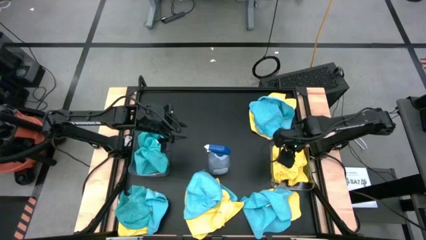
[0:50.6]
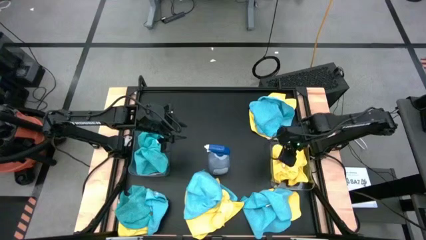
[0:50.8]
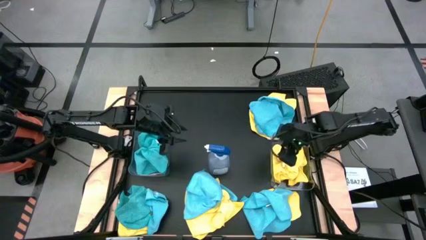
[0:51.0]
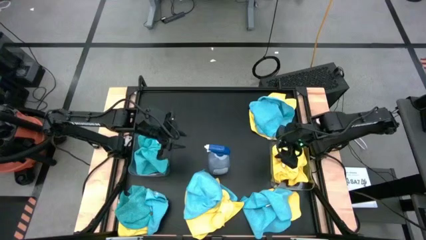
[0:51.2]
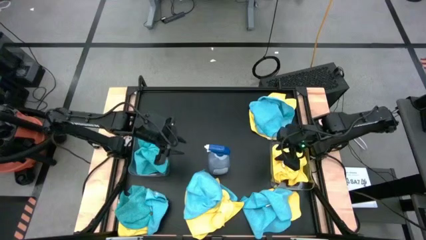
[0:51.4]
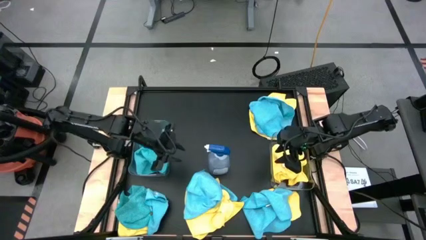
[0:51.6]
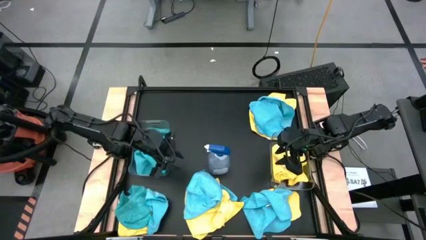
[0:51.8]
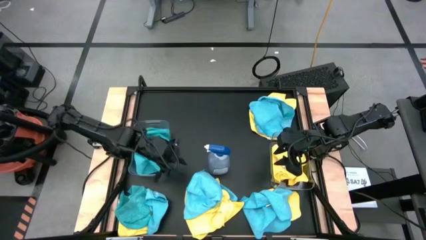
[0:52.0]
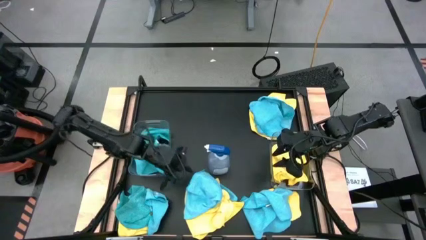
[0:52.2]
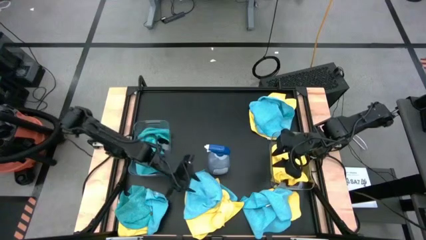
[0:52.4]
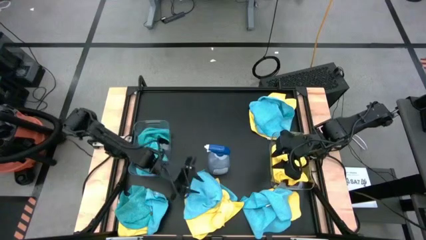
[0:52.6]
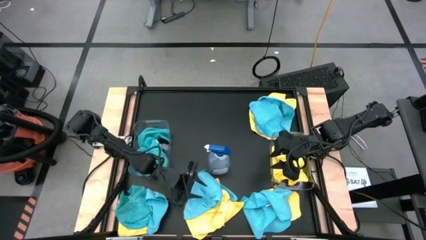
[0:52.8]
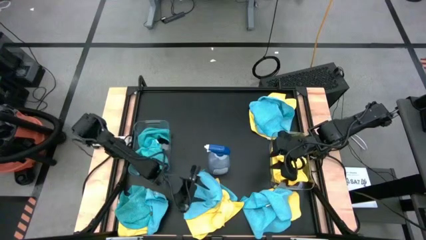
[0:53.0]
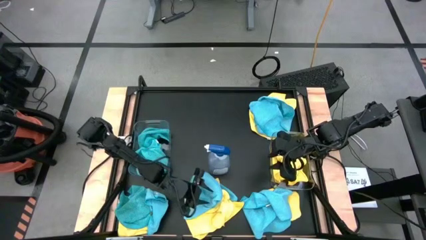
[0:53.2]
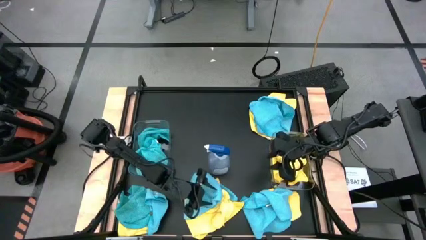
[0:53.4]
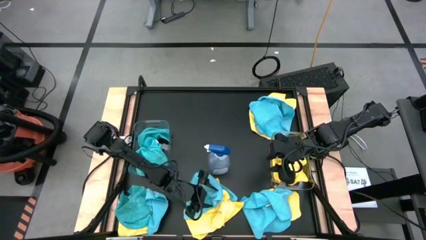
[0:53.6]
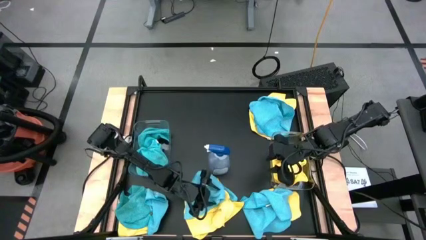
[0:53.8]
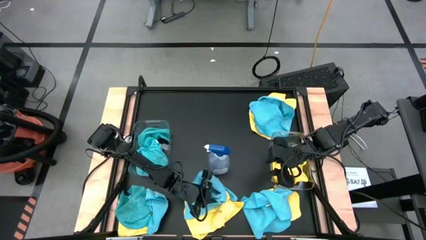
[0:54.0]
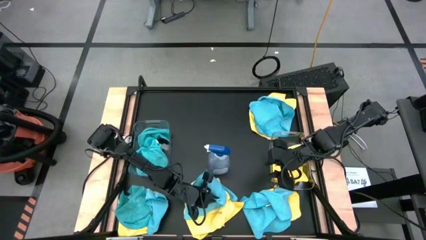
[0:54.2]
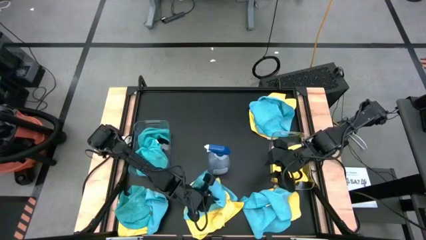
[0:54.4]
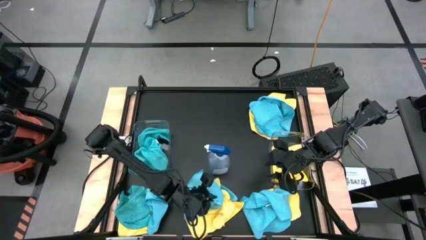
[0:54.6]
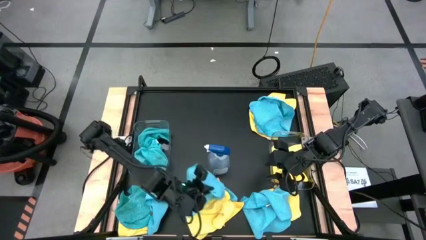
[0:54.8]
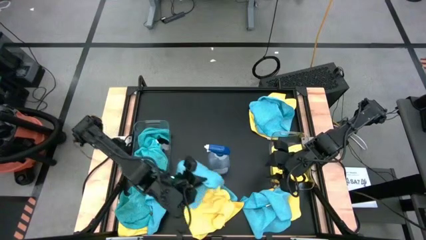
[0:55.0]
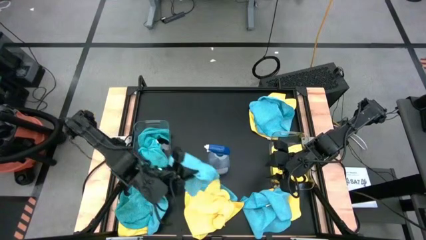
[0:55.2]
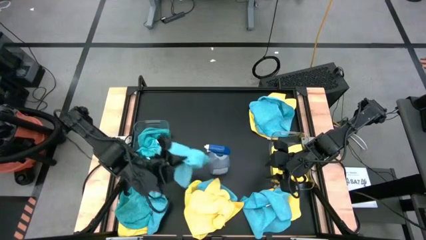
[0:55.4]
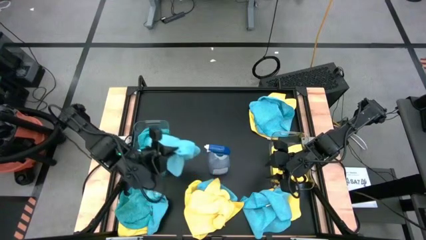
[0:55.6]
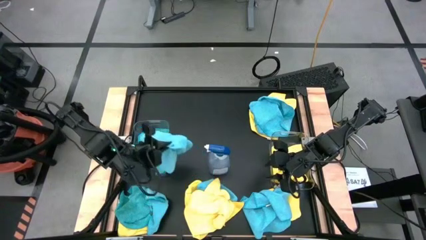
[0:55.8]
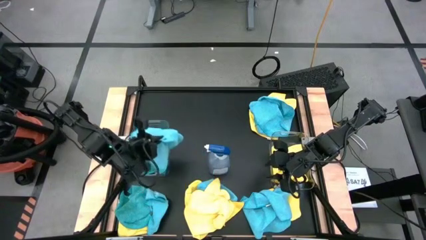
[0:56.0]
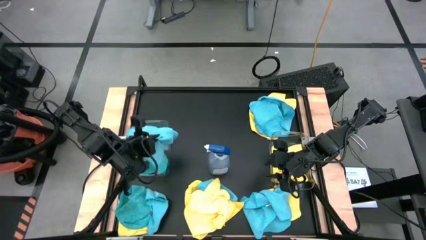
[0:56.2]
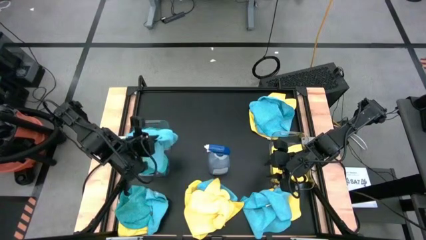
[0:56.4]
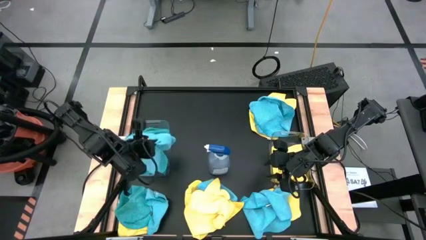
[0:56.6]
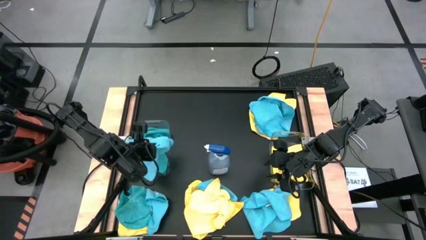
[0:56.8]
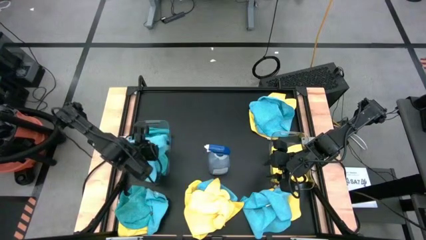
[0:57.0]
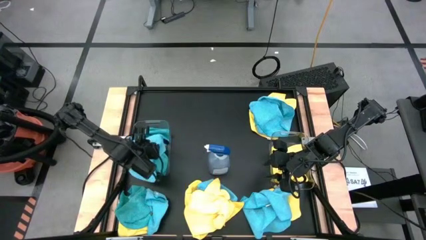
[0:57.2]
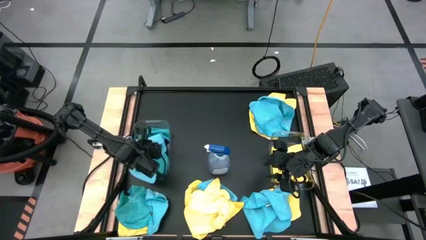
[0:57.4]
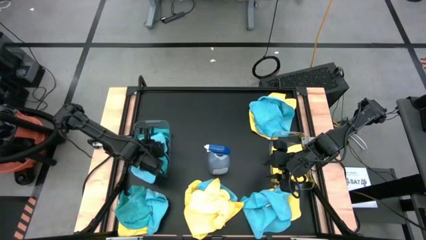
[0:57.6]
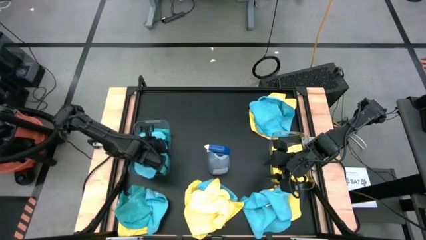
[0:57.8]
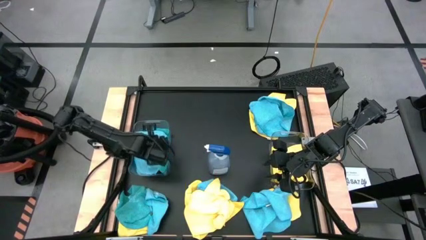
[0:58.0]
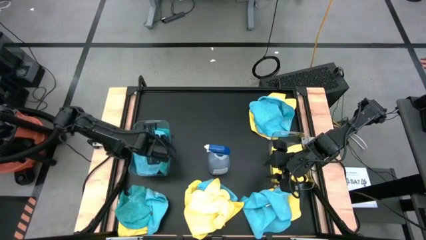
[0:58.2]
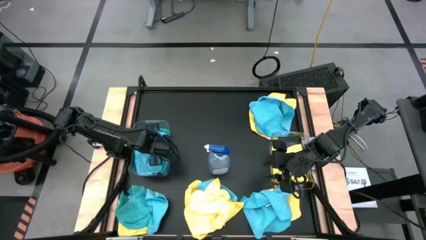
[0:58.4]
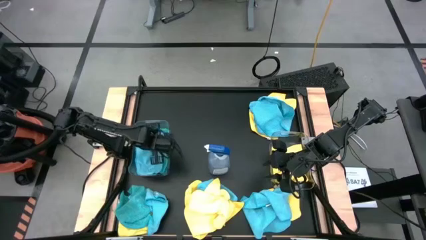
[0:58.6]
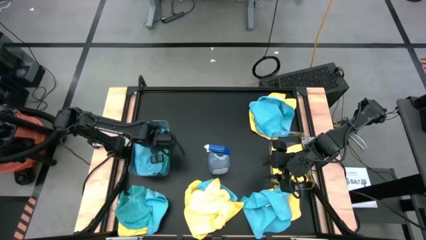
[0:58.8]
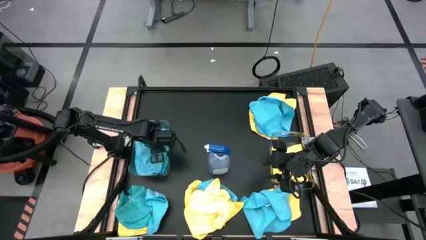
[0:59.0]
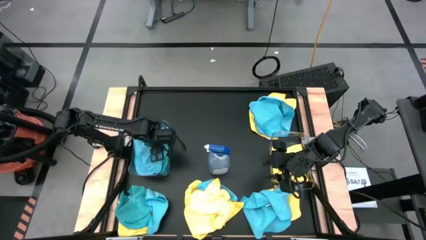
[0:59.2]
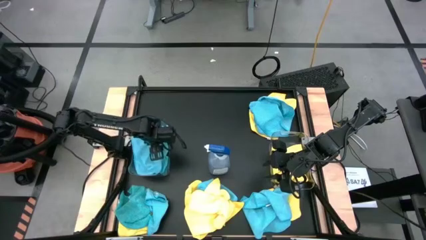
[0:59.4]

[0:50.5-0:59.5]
Task: Sort microfiber towel by color & place in baskets
Put the blue microfiber cloth into the left transparent bin

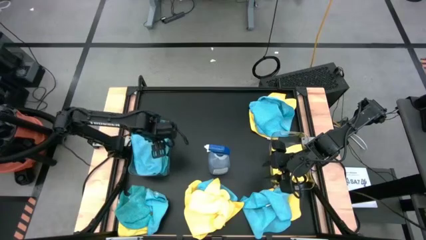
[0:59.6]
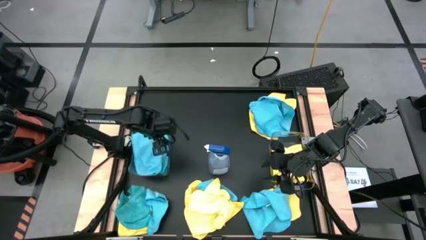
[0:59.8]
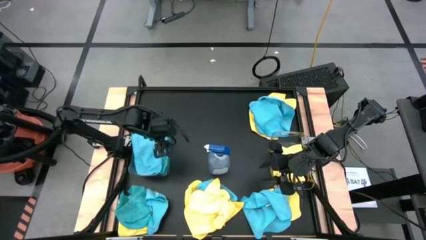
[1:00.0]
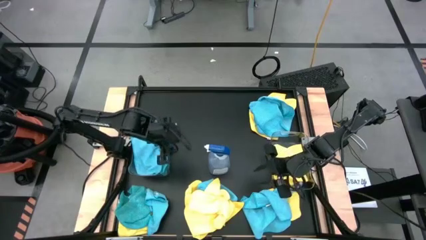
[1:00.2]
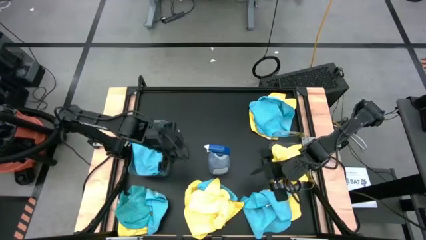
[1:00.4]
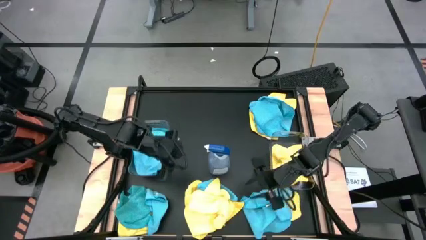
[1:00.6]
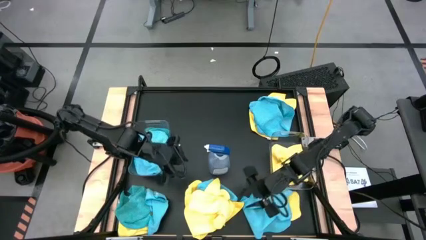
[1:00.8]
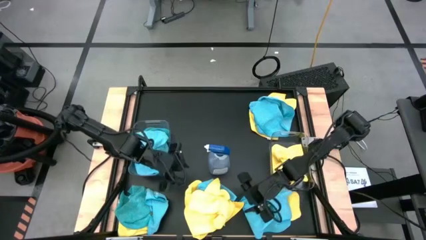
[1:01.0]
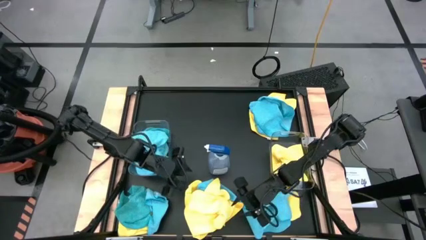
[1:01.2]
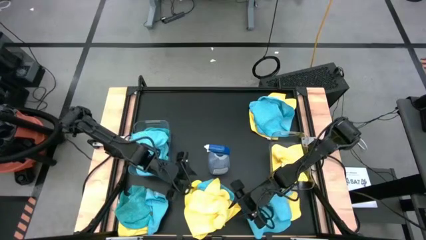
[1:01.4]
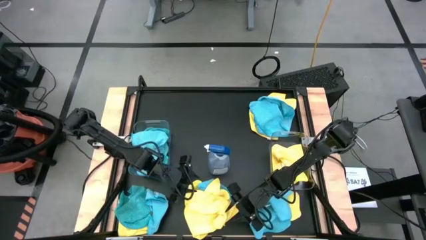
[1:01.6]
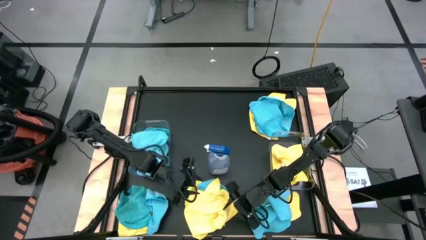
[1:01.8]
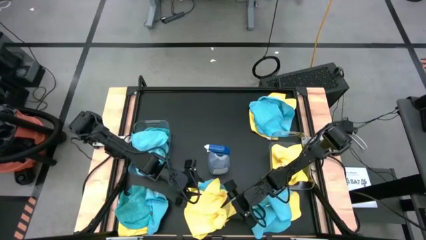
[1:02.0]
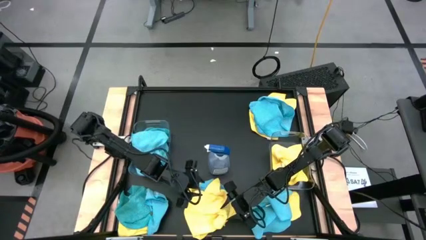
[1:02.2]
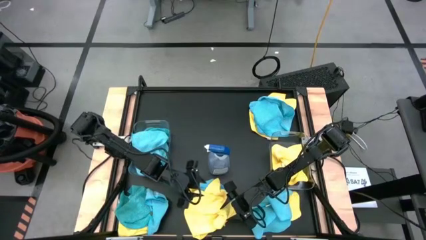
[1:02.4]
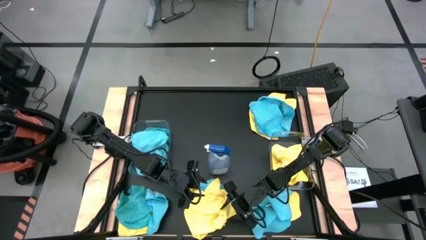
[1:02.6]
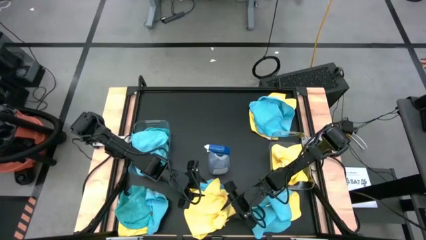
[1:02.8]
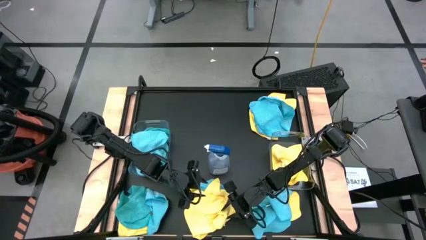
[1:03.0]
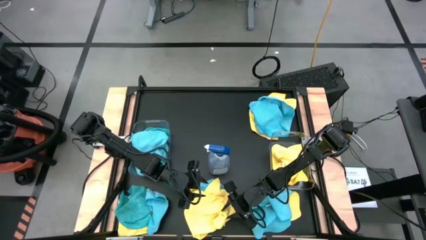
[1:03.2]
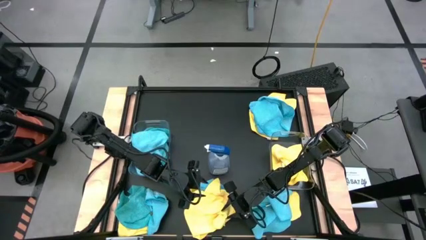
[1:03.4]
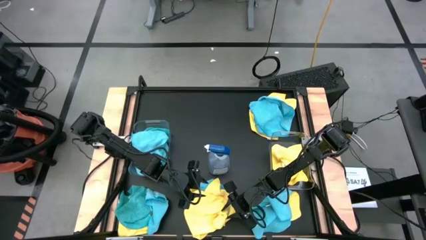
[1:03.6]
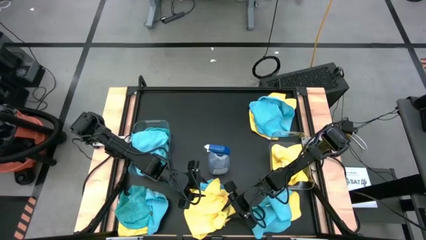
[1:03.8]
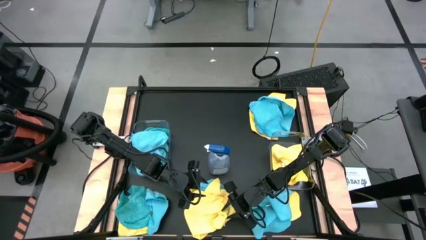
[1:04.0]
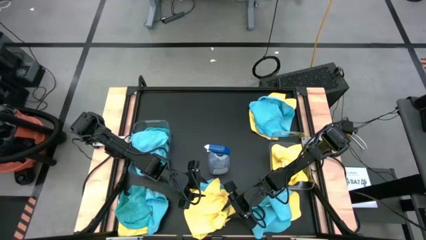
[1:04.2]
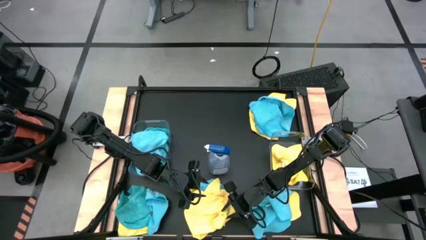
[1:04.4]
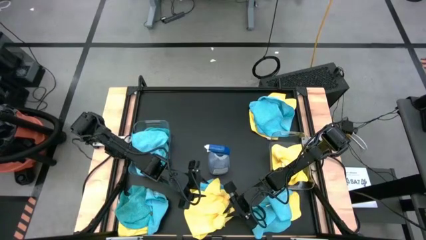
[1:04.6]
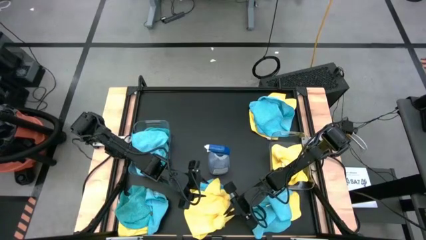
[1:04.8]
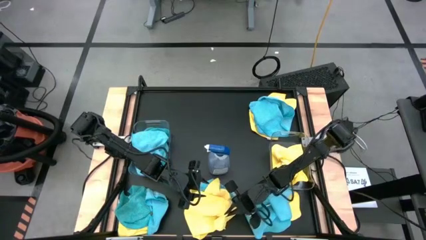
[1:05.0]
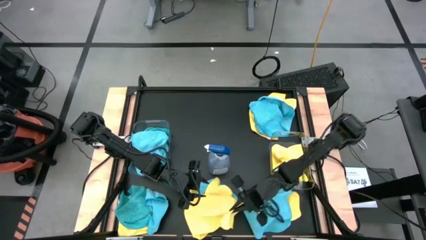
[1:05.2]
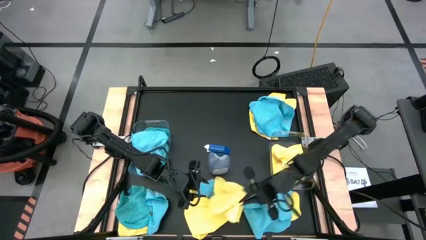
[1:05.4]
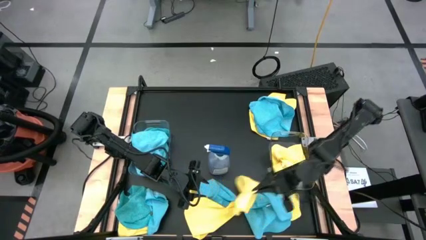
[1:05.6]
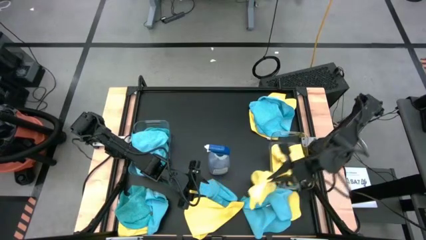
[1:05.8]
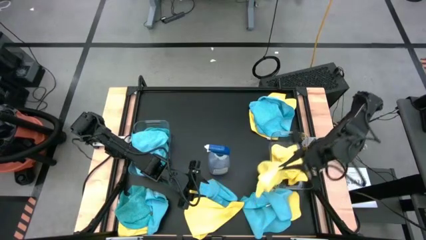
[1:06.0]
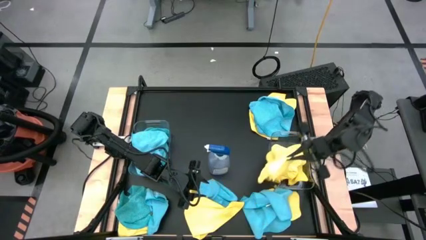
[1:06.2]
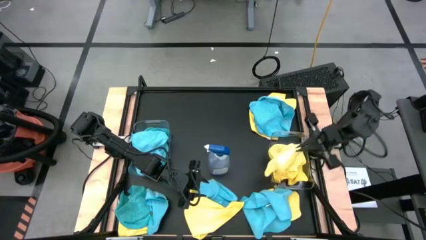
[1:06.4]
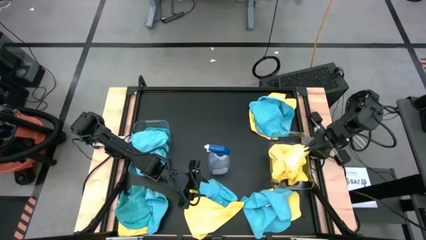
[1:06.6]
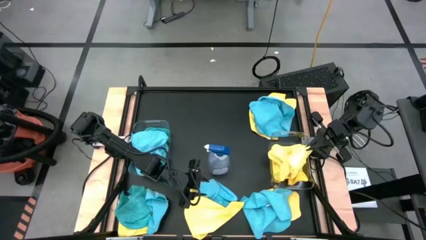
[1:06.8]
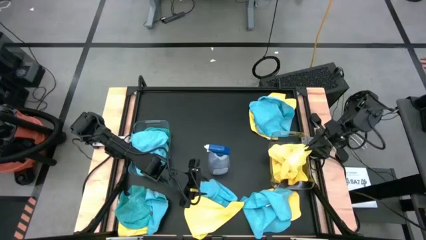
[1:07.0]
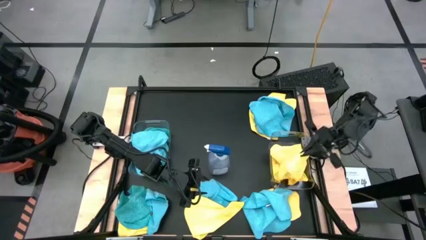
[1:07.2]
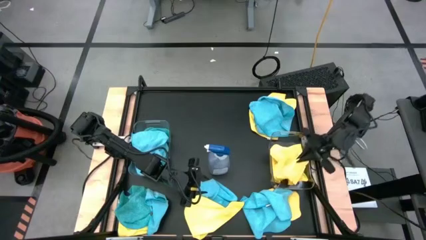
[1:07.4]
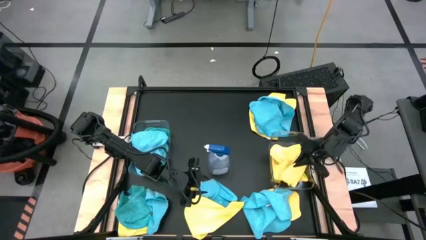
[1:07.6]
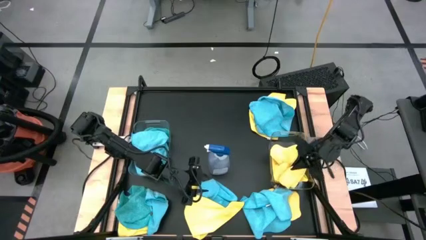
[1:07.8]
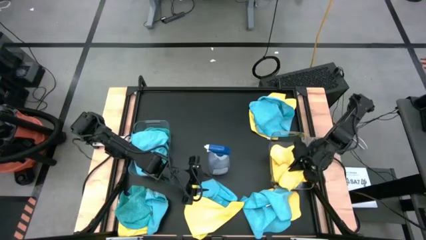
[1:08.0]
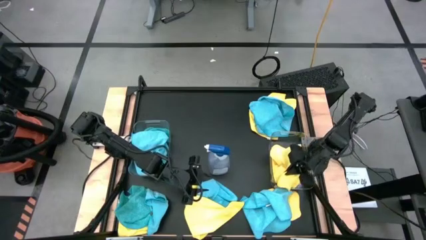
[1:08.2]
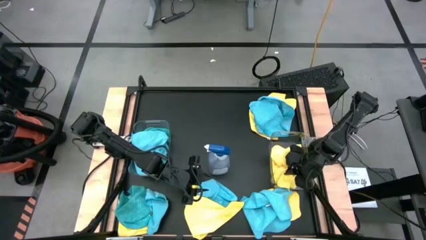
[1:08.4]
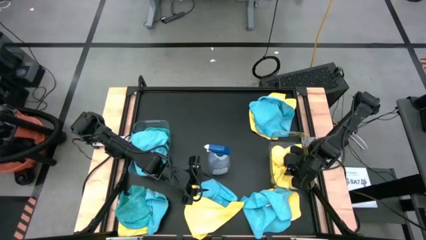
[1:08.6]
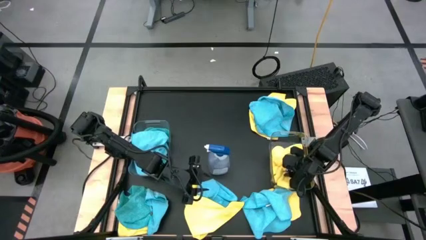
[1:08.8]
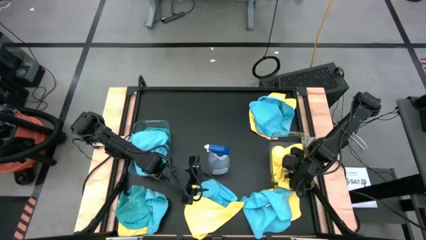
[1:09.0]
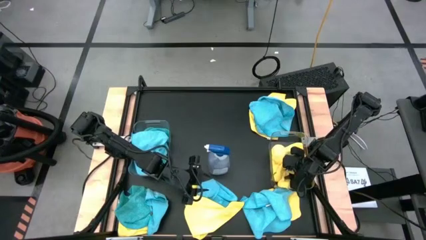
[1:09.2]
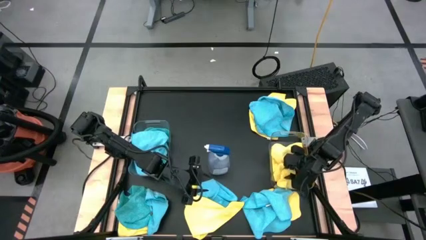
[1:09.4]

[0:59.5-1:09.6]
Put the yellow microfiber cloth into the right transparent bin
